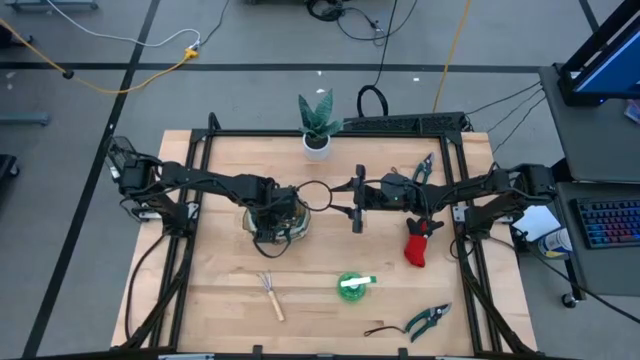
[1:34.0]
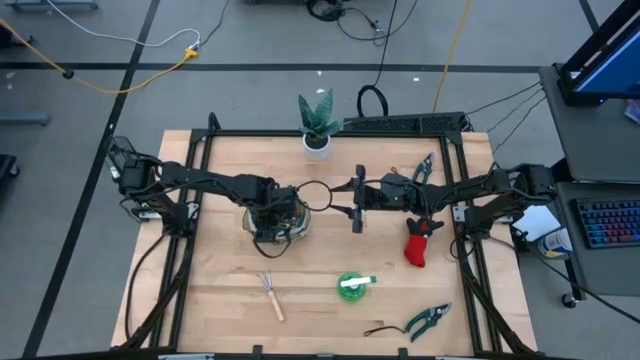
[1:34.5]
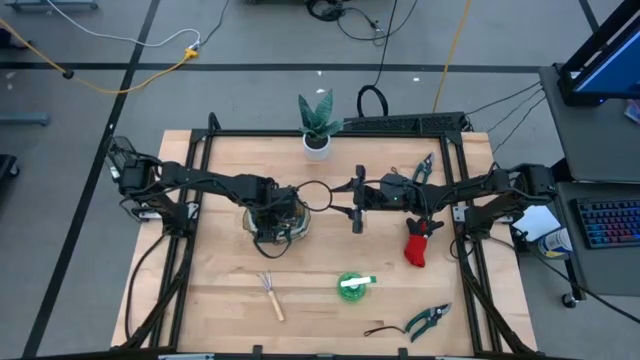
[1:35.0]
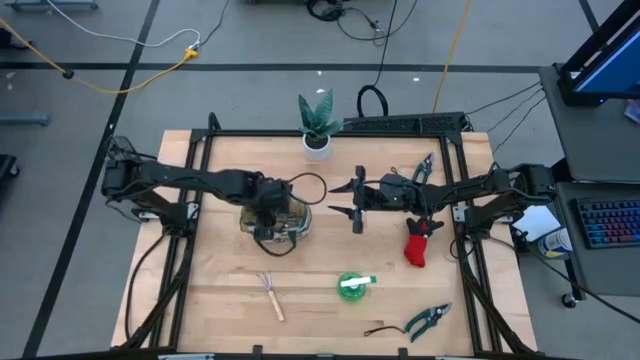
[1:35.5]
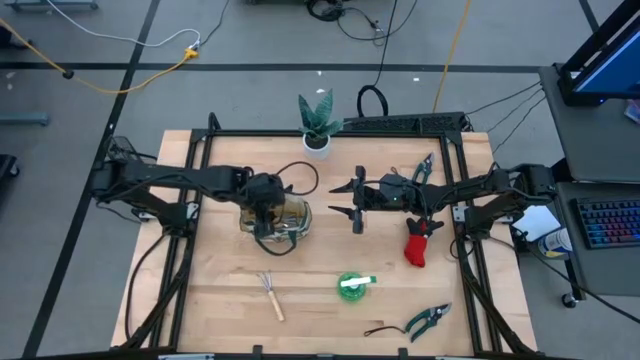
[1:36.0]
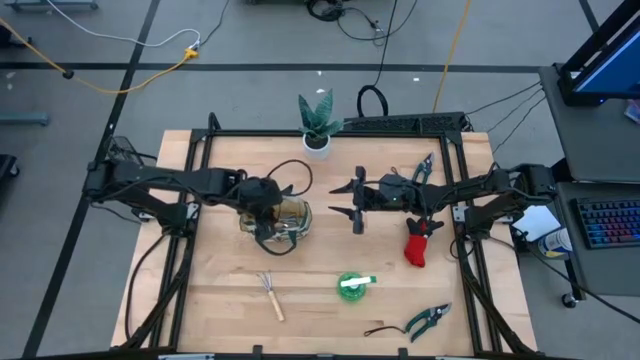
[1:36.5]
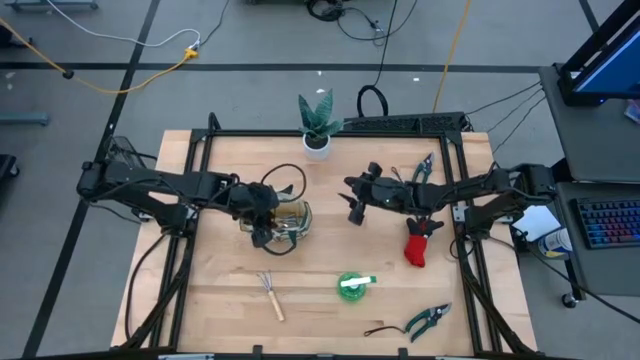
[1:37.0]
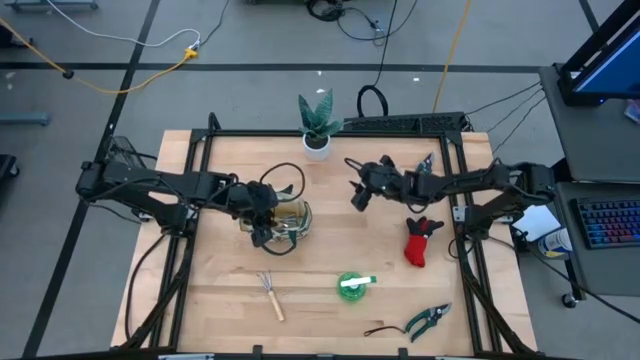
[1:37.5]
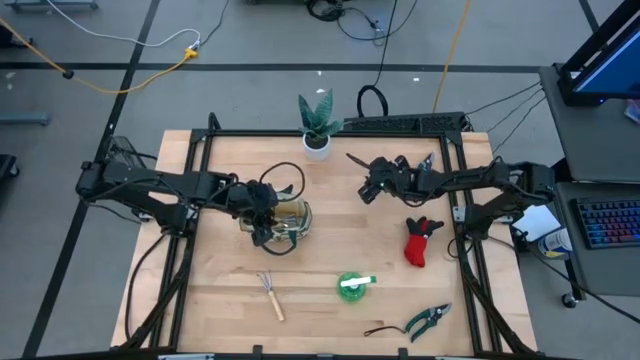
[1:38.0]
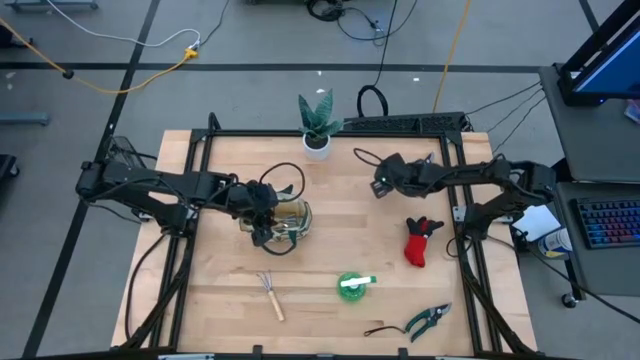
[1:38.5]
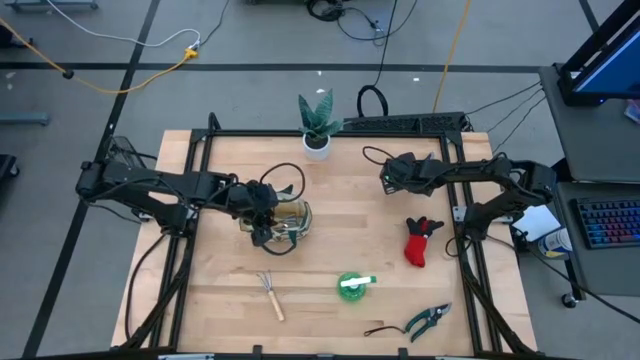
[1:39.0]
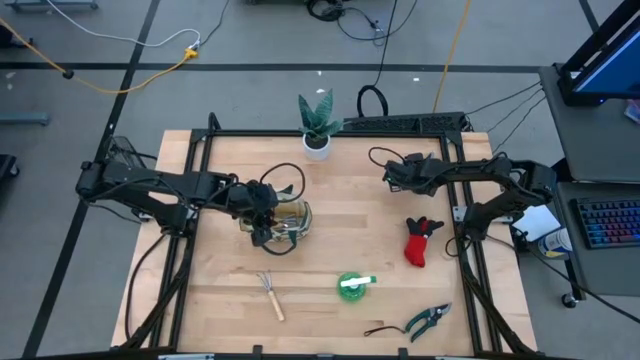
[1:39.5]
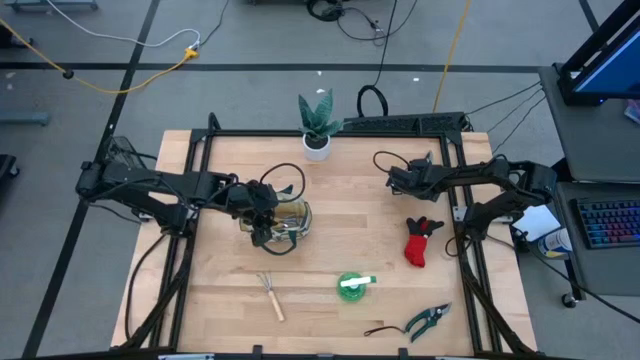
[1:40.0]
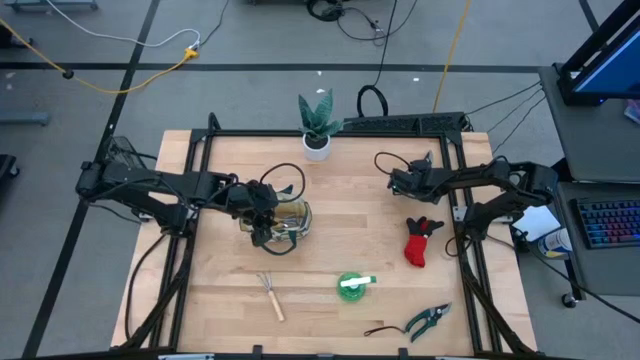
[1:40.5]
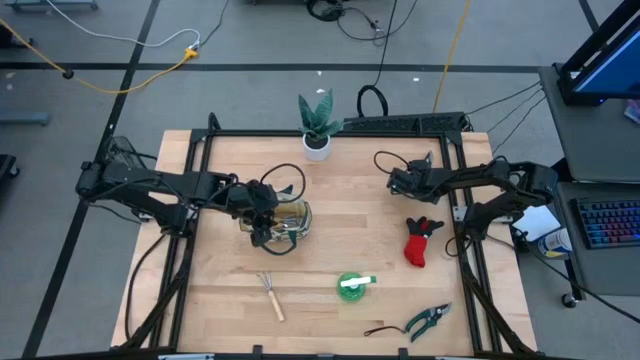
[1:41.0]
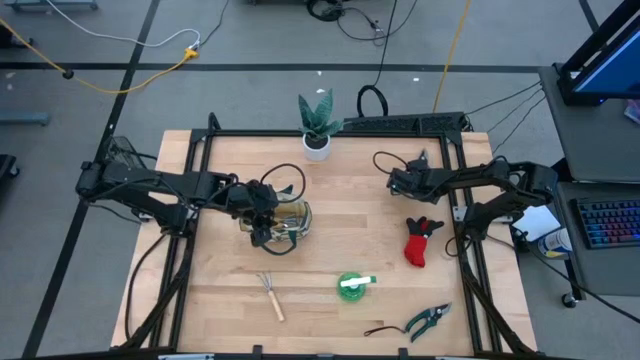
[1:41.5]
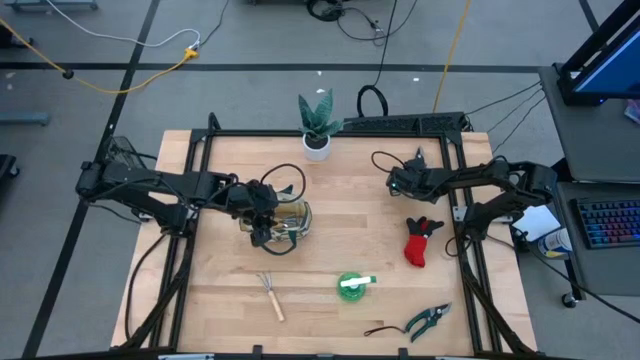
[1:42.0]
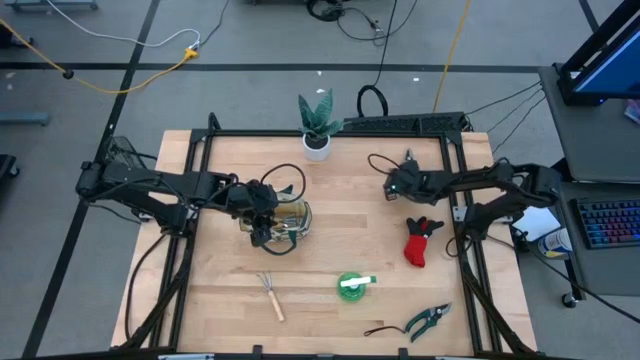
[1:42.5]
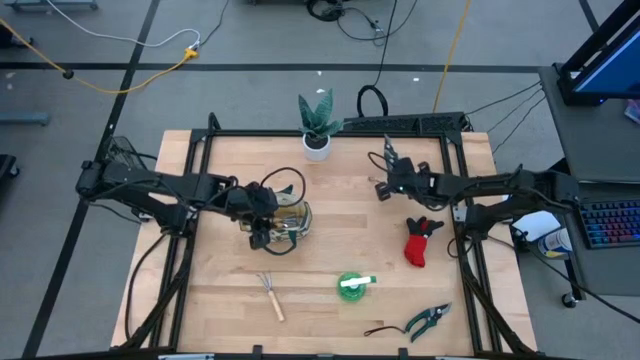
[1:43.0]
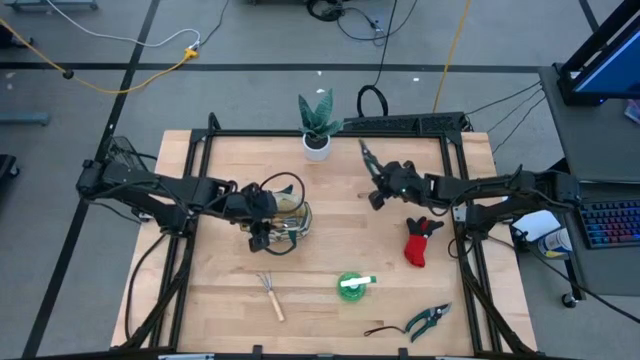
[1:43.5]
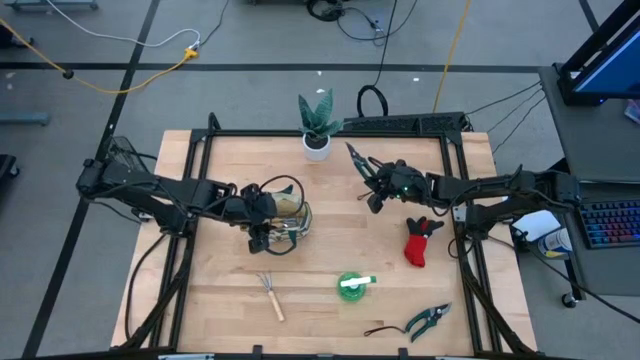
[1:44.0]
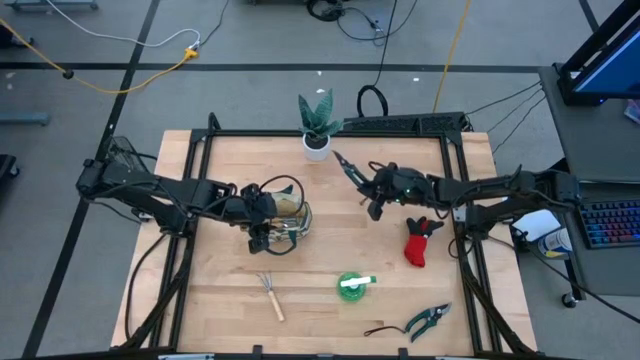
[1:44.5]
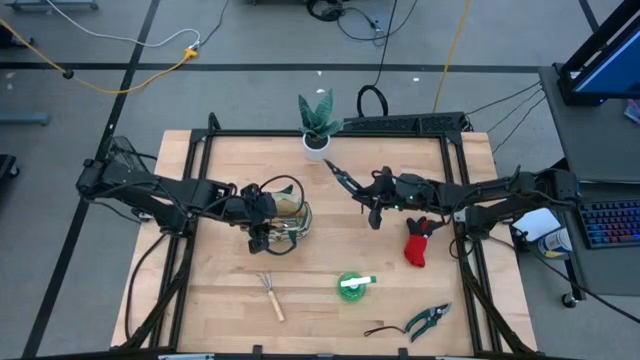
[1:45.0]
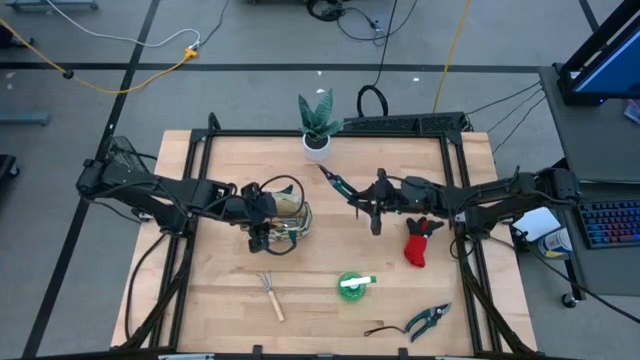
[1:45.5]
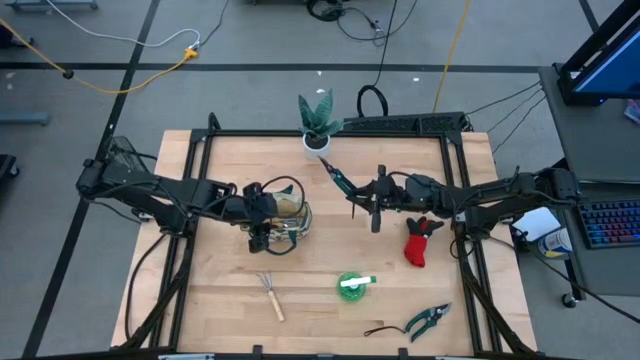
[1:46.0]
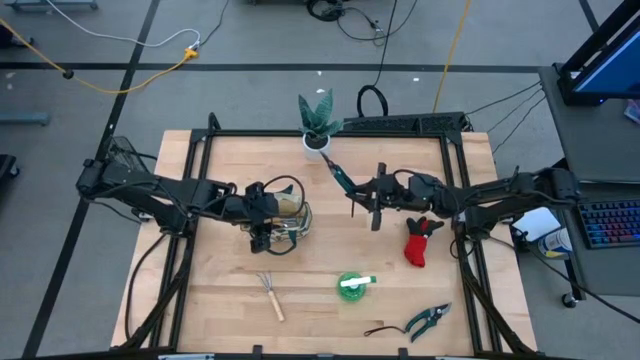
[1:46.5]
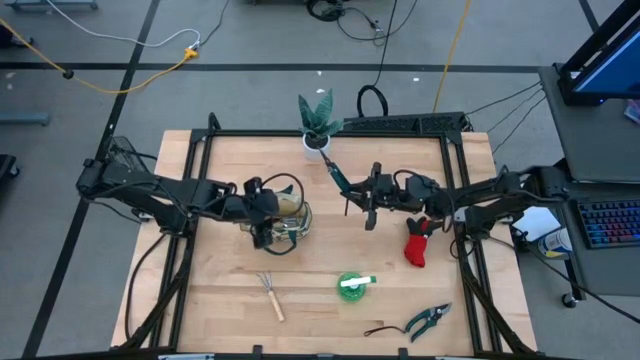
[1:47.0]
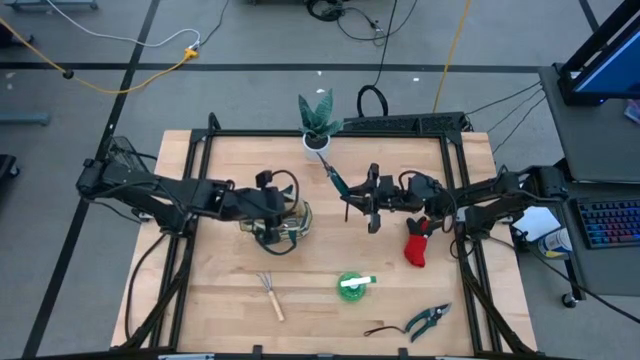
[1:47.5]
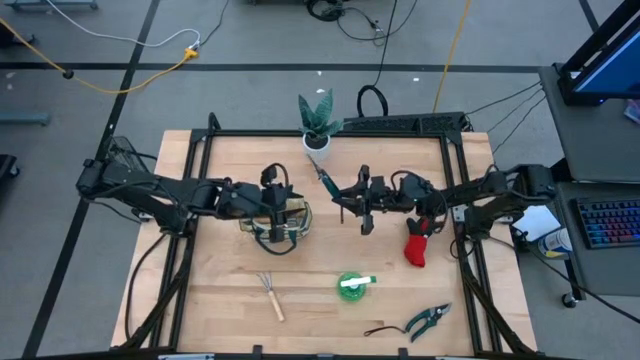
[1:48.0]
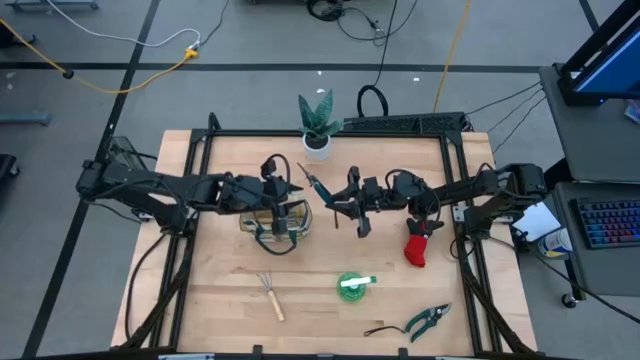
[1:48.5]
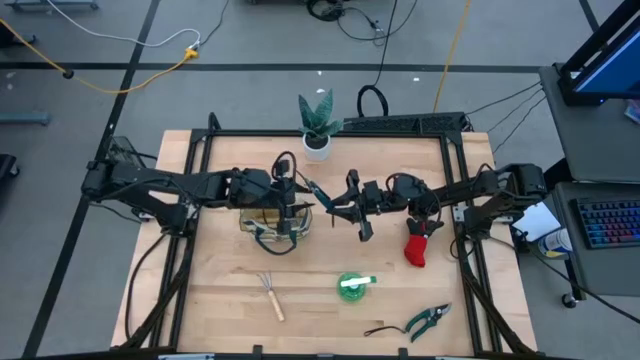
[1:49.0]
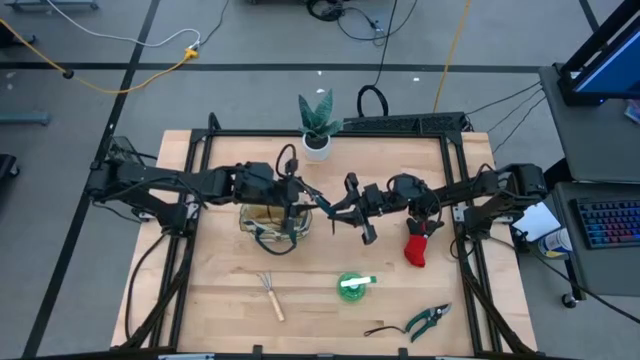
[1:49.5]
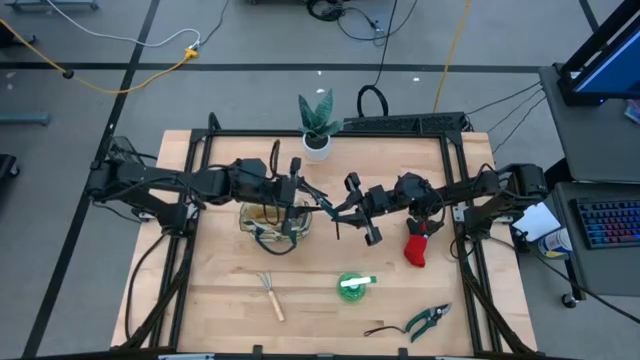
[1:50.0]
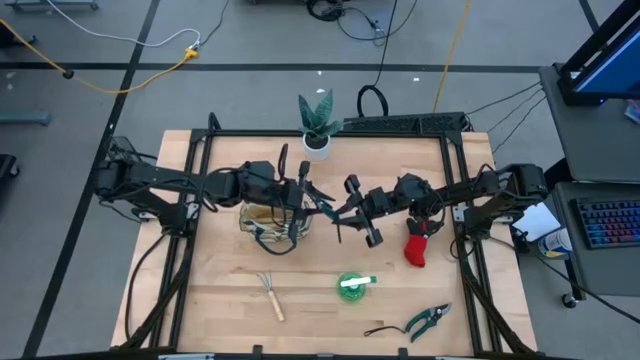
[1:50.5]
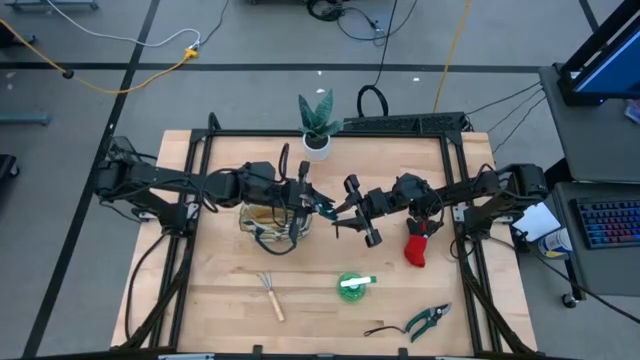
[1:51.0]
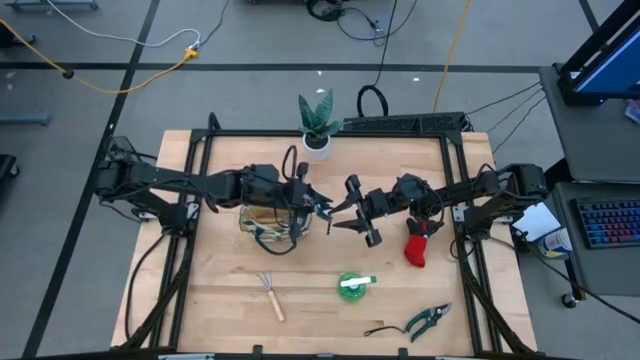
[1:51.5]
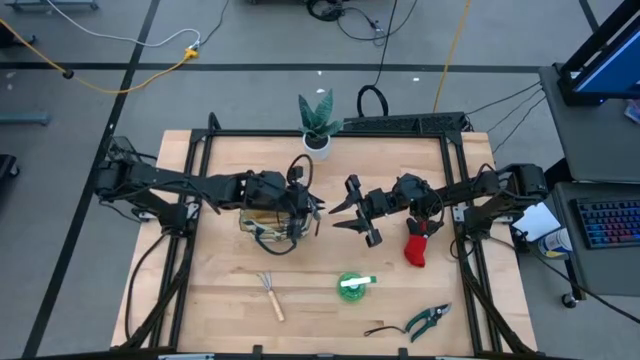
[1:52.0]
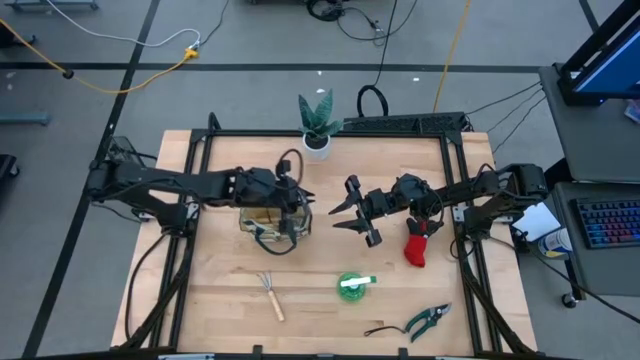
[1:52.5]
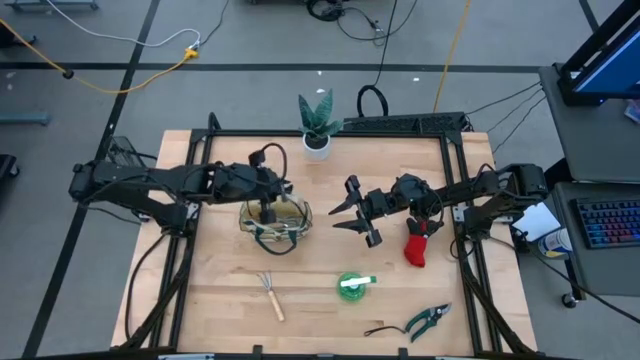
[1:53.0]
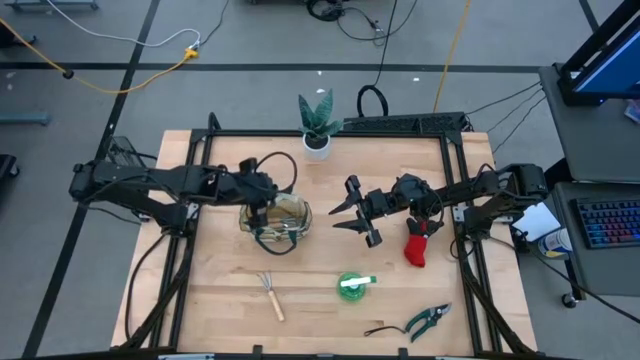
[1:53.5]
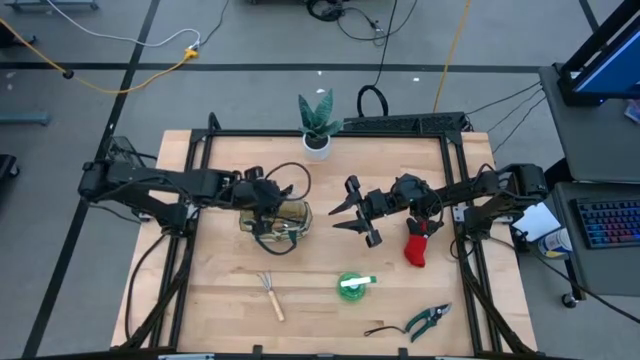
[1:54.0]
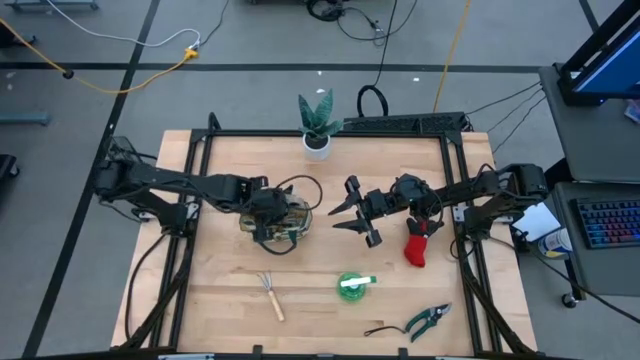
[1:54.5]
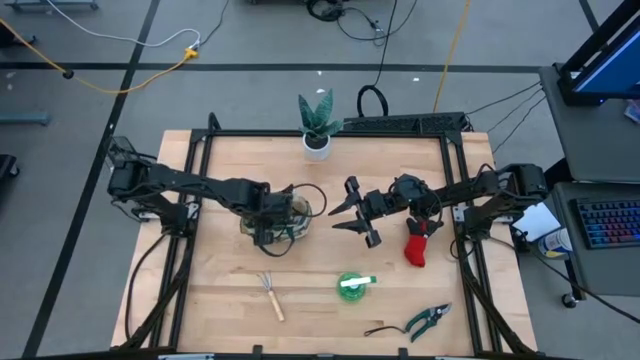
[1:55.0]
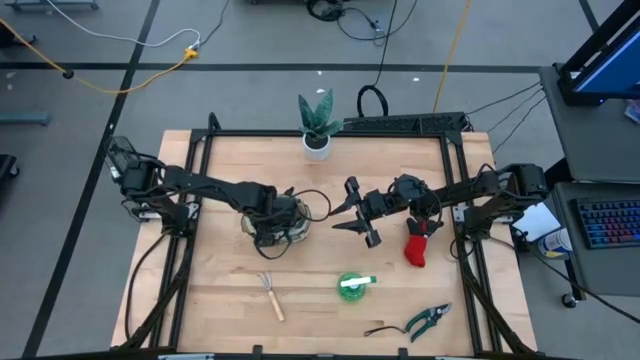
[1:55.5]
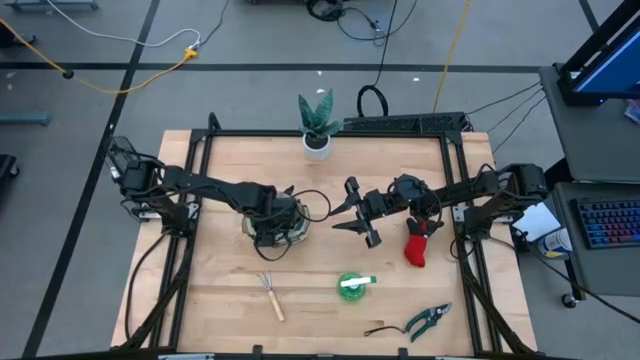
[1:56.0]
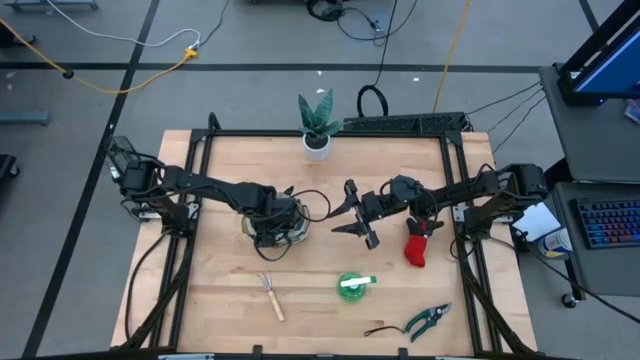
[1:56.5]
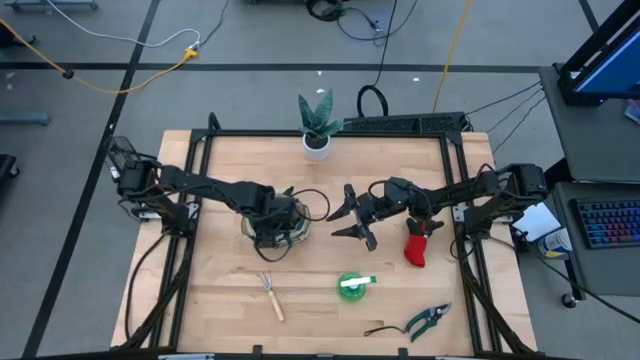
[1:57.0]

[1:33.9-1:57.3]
Task: Pick & Place Garden tools in Gardening bag
Put the top green shear scissors into the white gardening bag
